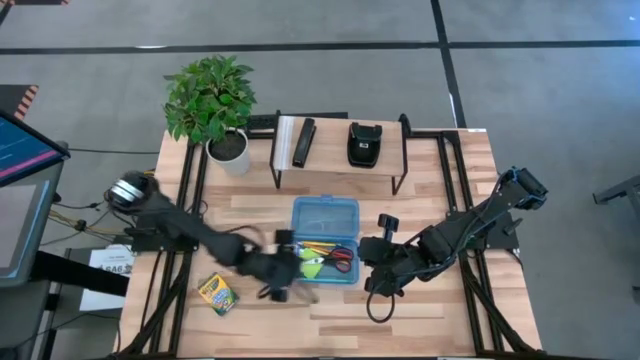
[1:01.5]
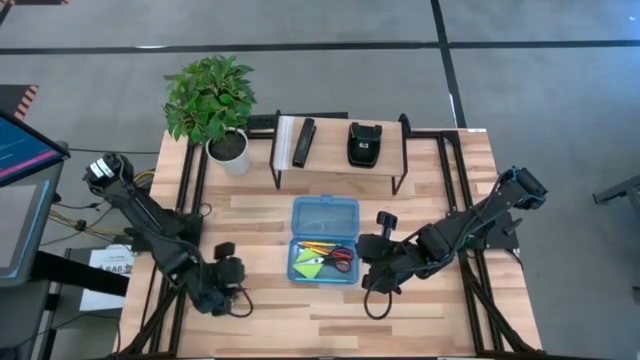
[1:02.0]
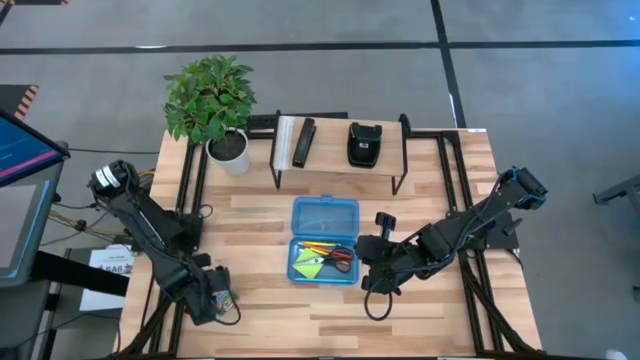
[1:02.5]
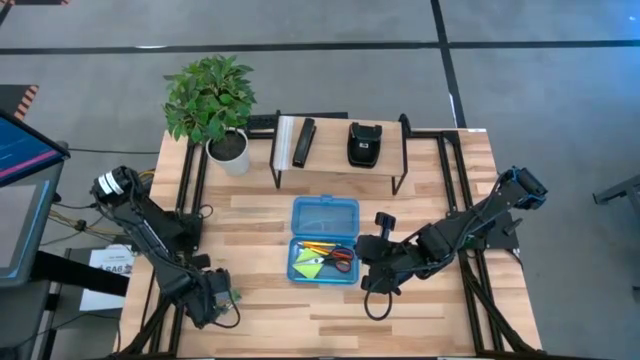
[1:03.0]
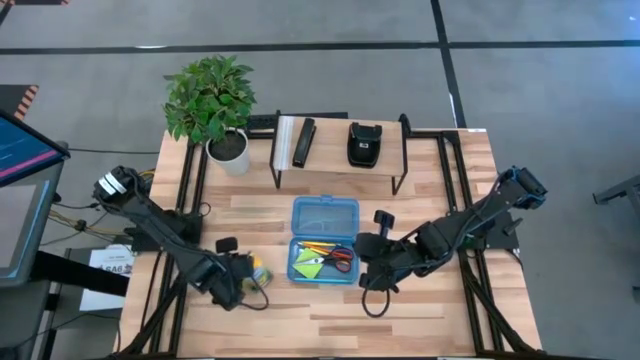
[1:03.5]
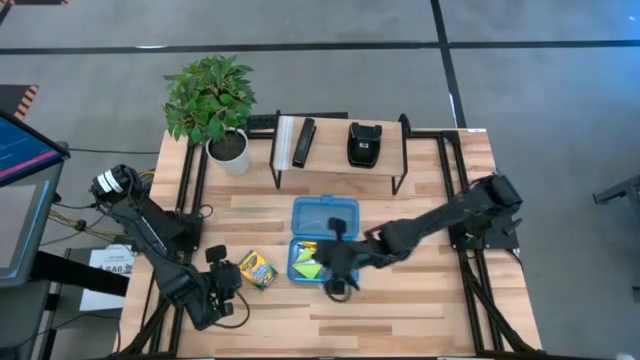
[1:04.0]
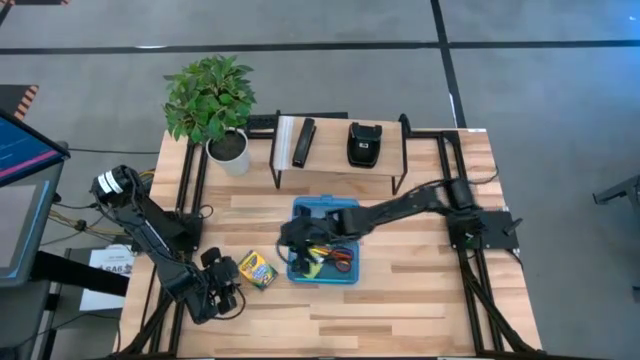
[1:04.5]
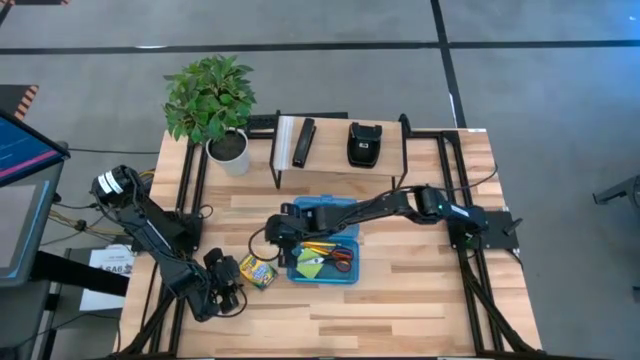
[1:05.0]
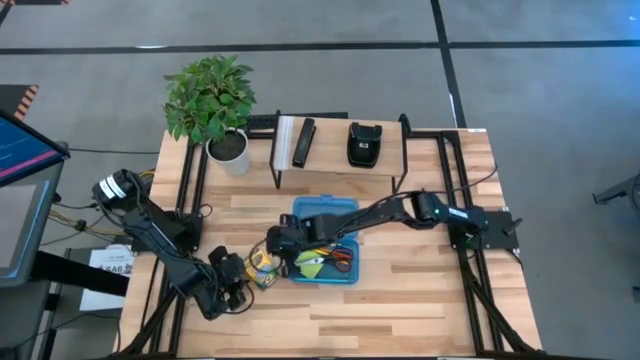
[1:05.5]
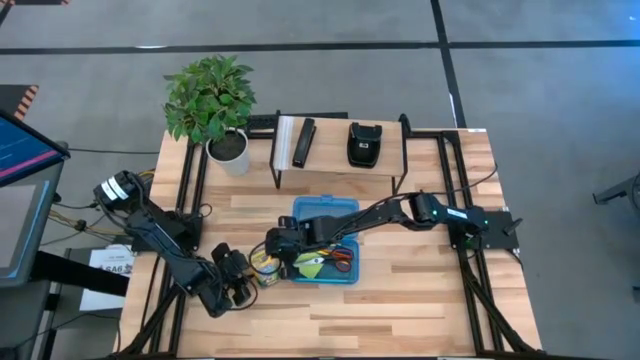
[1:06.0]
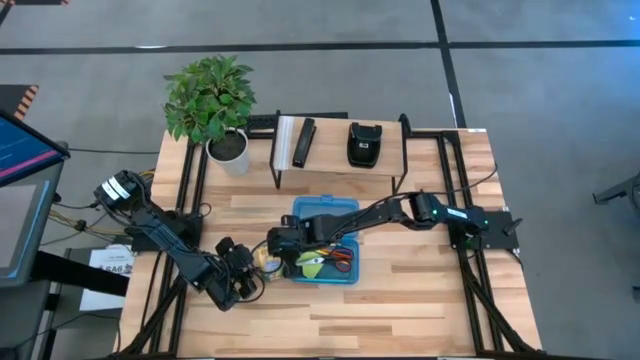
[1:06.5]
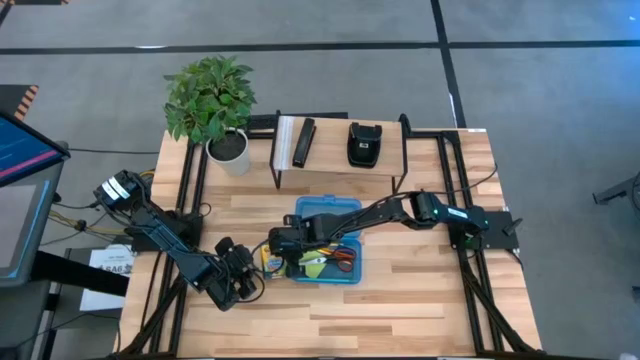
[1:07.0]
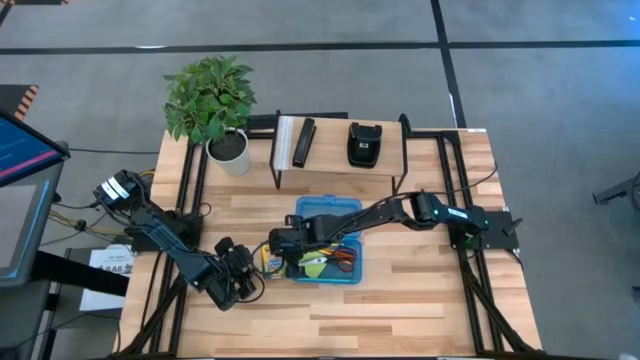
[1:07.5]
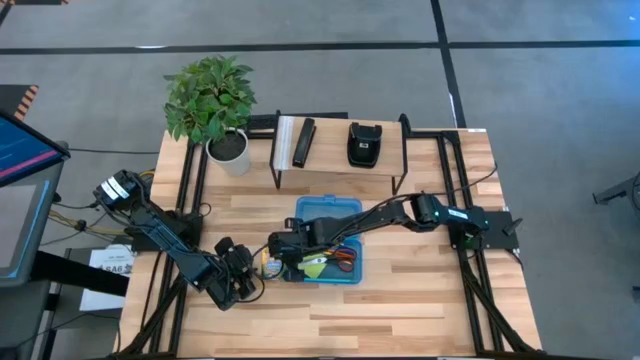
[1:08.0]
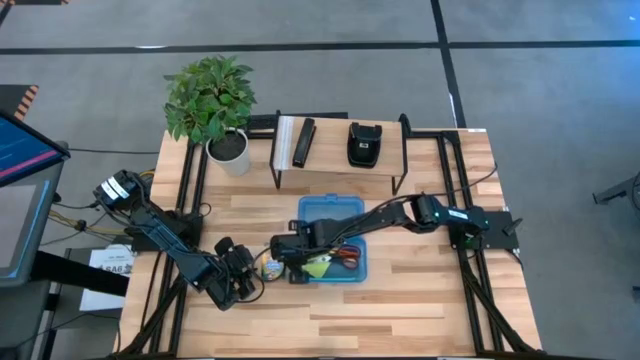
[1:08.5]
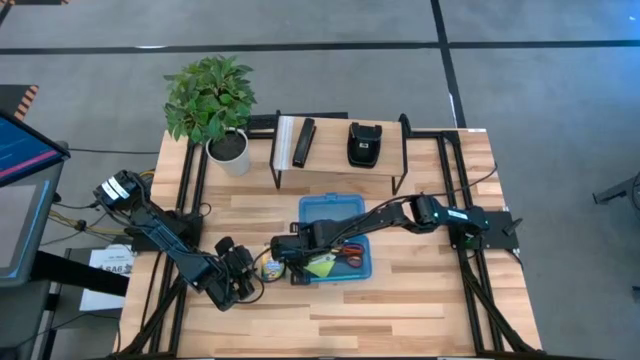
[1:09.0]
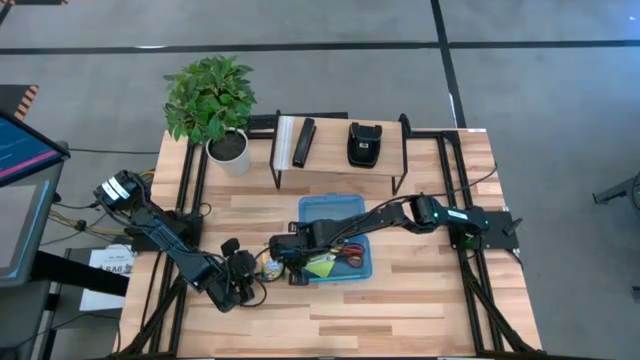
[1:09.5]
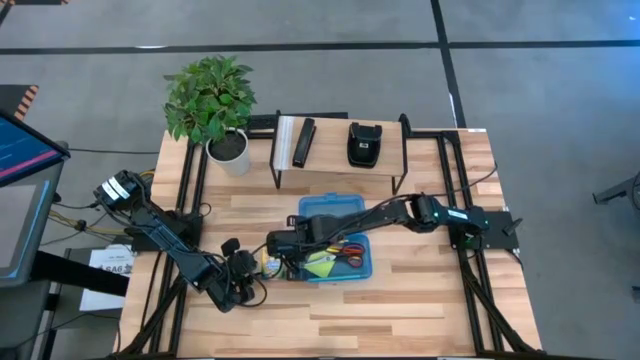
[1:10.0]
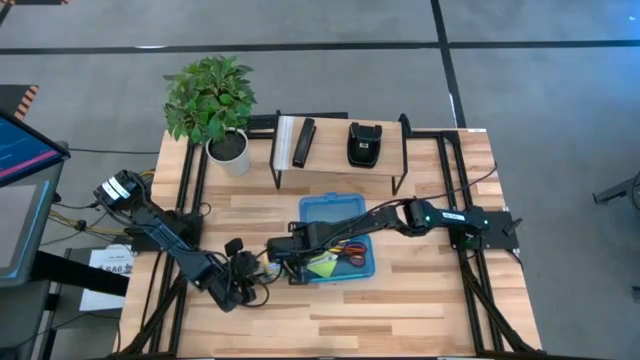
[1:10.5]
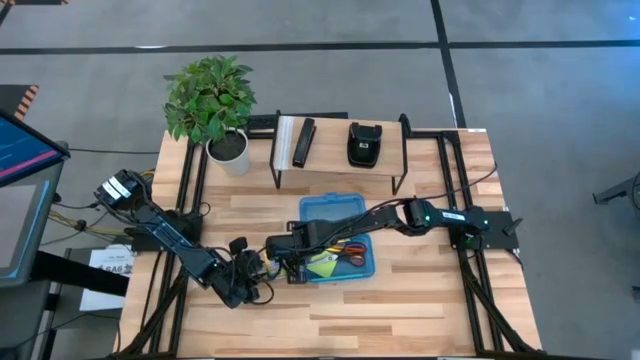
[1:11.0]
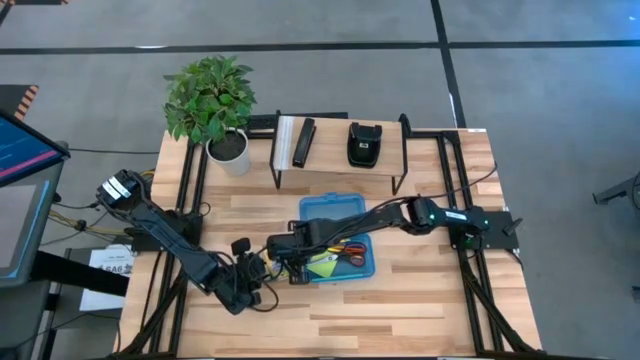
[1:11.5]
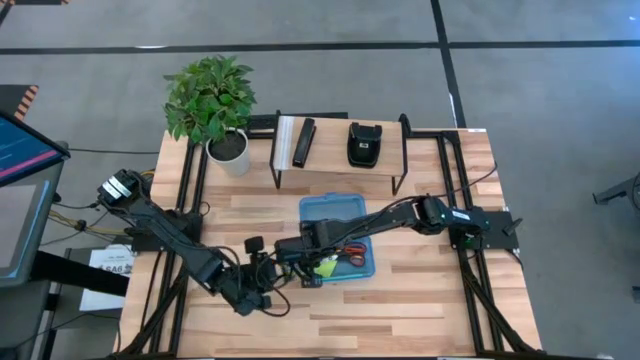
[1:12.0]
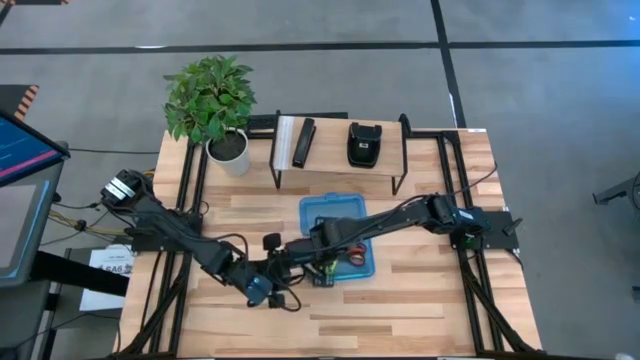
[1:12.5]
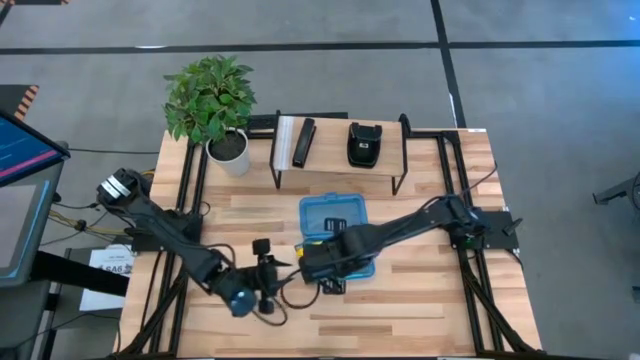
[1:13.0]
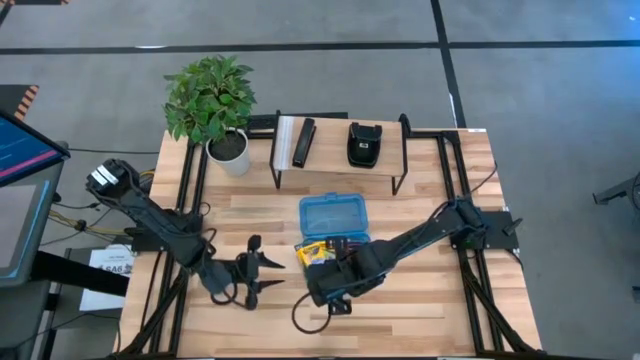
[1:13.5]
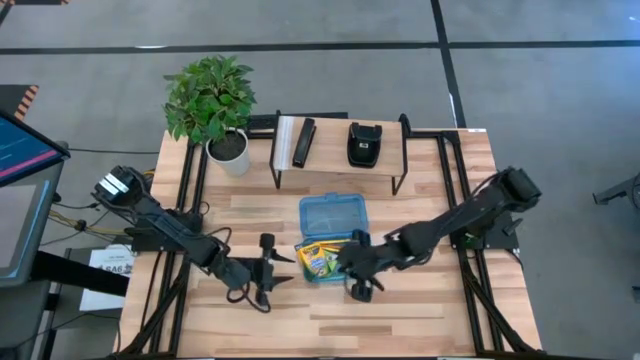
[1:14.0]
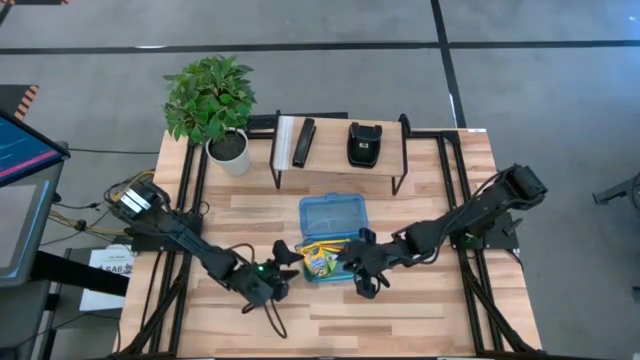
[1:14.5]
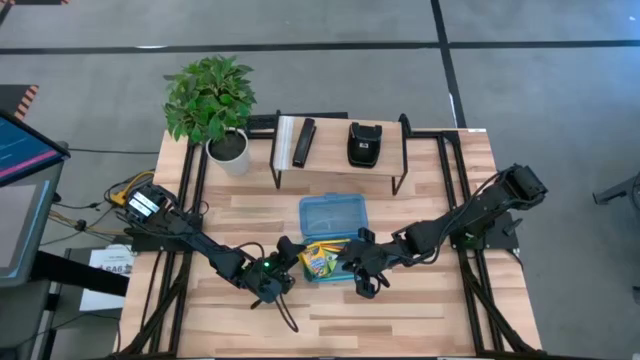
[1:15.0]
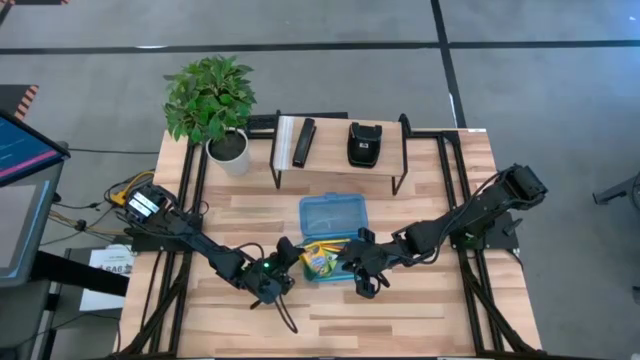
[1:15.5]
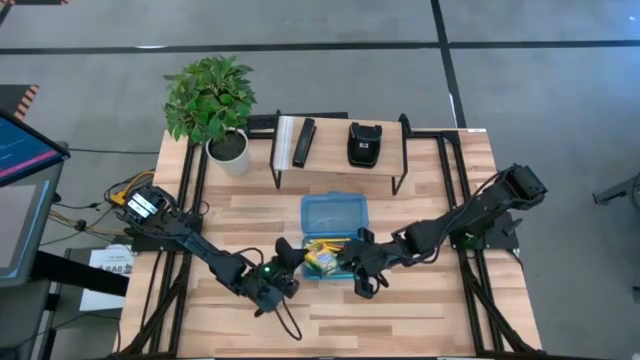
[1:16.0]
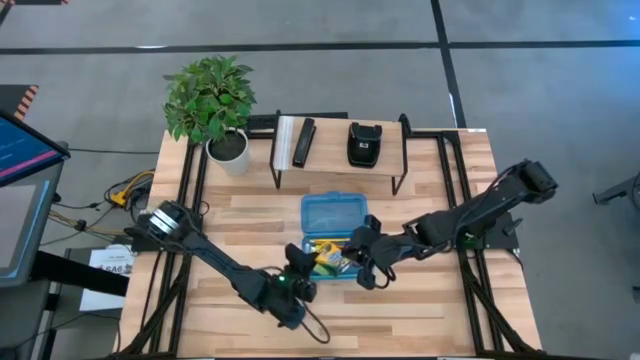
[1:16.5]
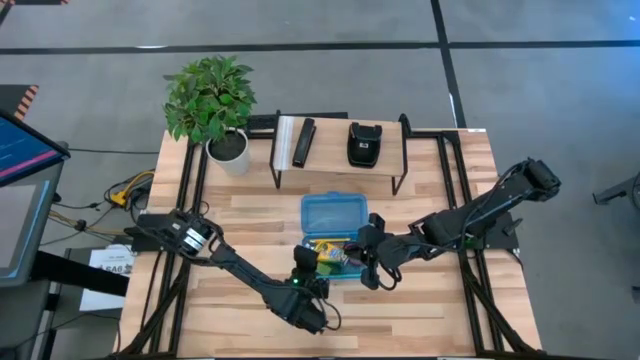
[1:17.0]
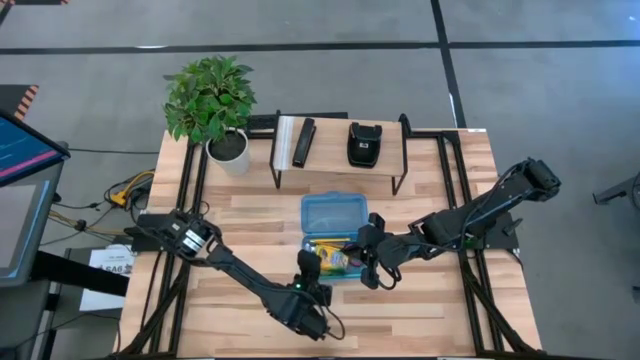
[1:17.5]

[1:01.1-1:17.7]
Task: Pack school essentials
Put the yellow crayon box into the blue supply box

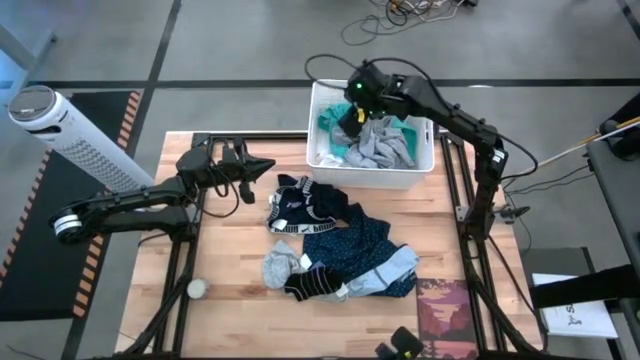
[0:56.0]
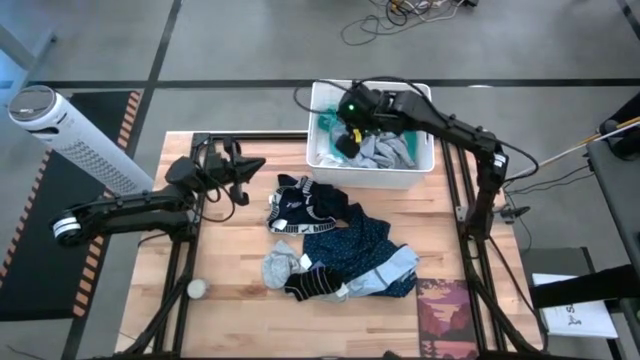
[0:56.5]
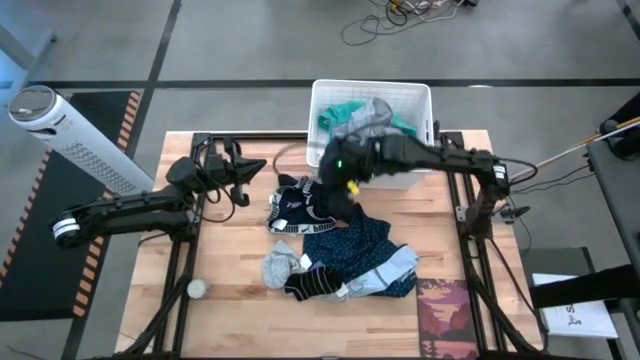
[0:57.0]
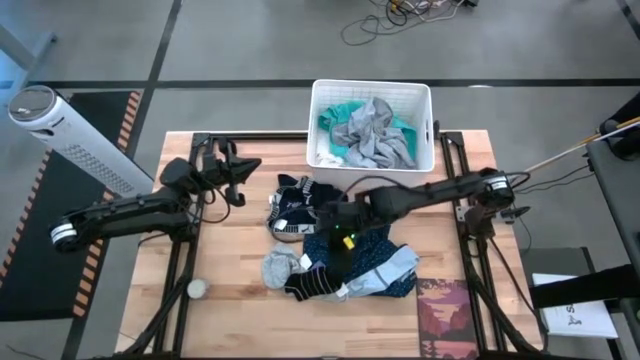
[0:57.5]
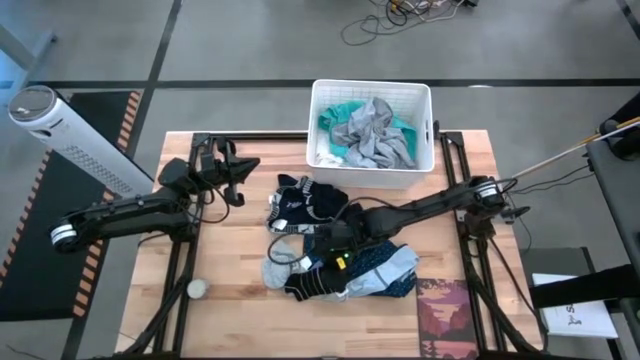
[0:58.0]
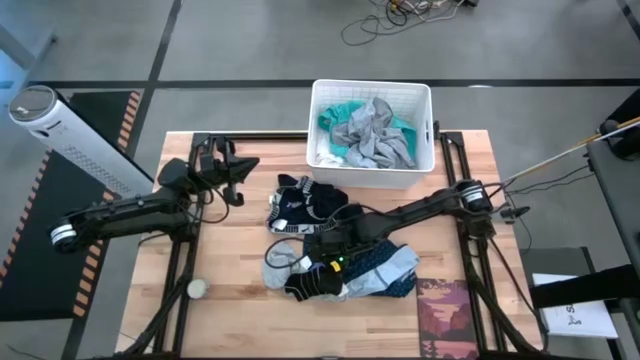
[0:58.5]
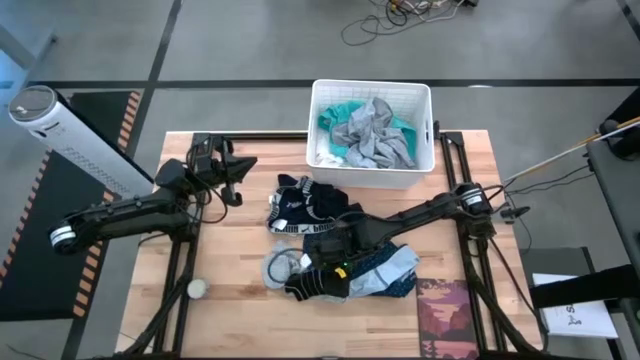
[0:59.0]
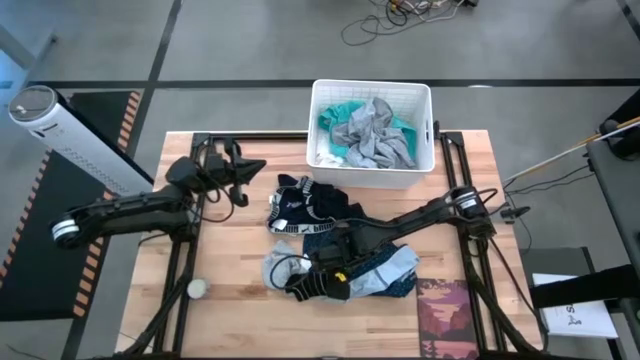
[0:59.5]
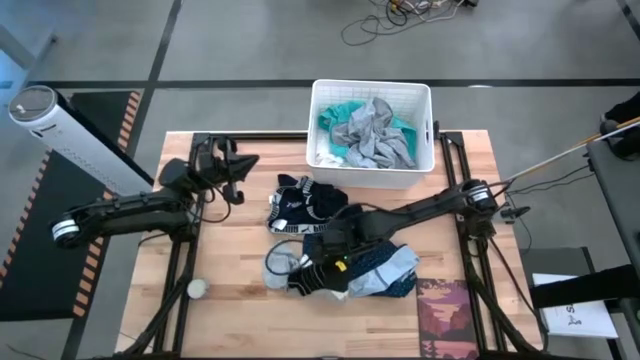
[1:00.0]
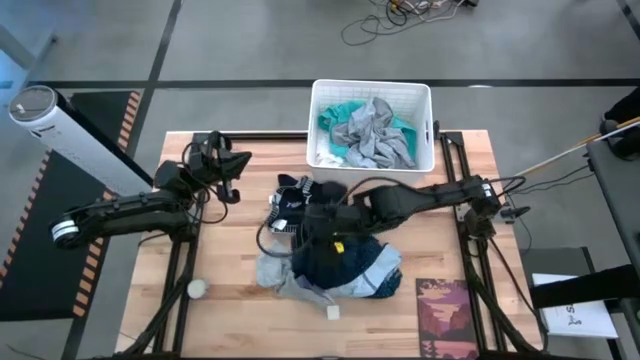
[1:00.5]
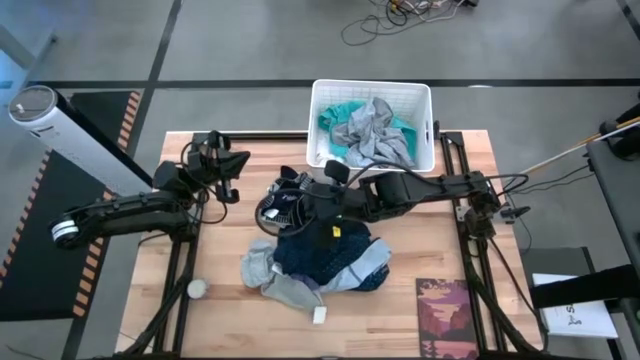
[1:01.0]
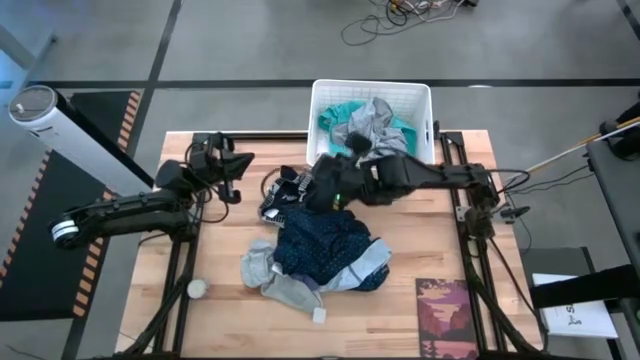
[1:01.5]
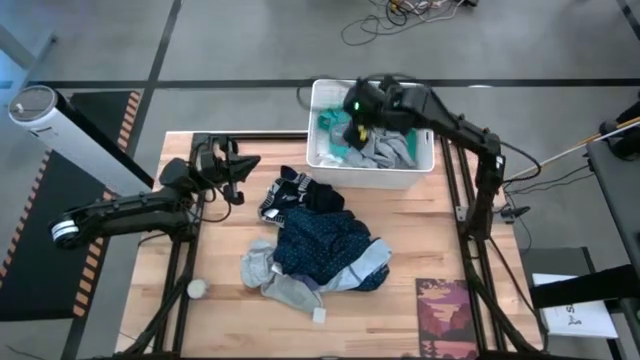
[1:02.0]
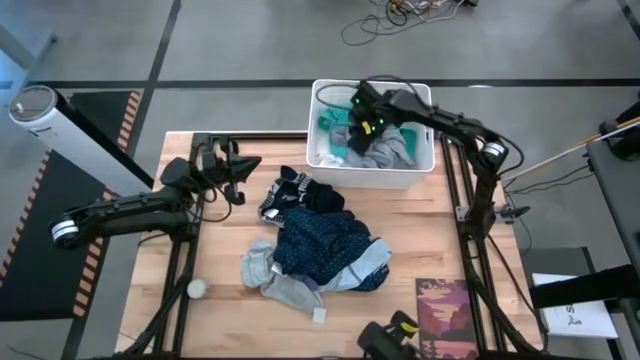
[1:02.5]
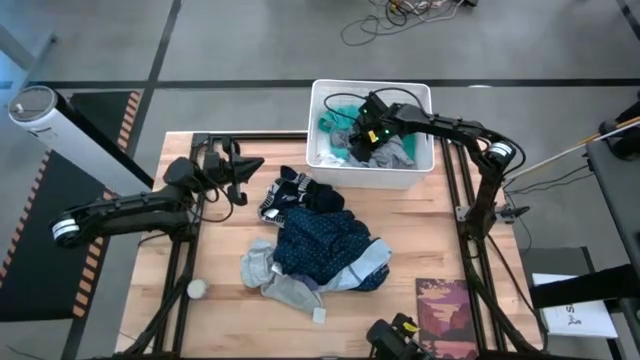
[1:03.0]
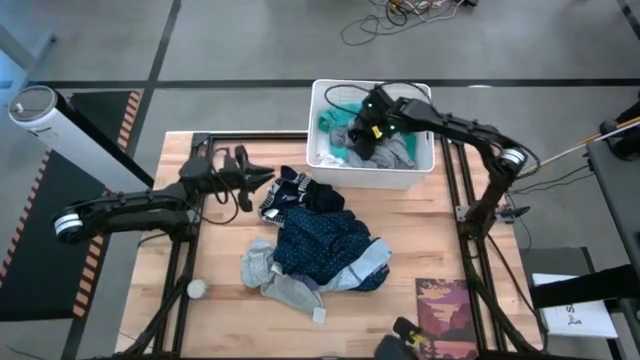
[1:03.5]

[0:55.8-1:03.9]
Task: Sort clothes
Put the black sock into the white laundry bin
